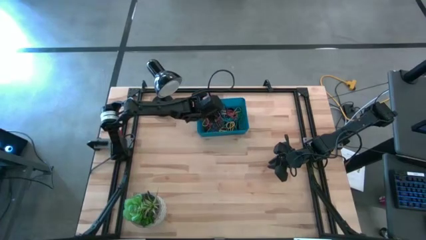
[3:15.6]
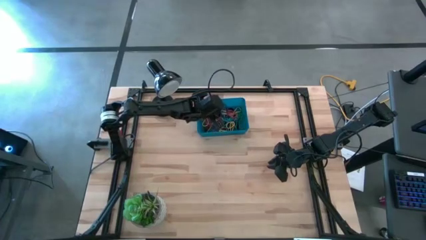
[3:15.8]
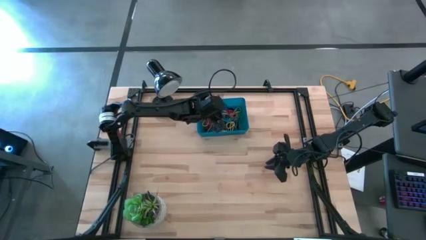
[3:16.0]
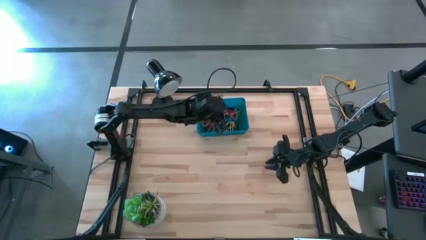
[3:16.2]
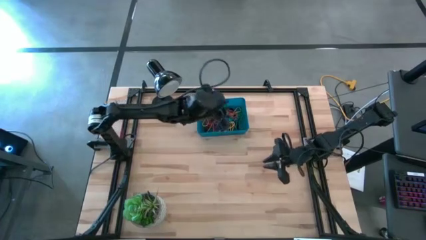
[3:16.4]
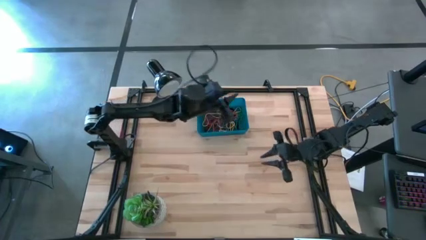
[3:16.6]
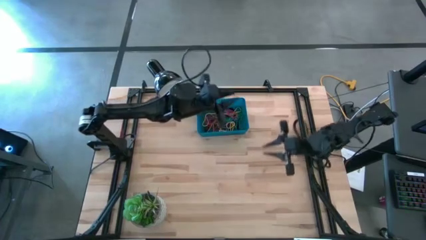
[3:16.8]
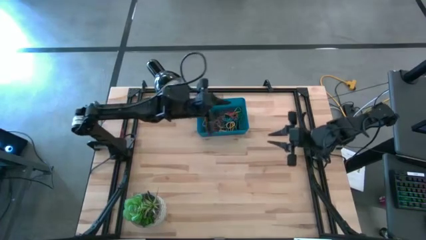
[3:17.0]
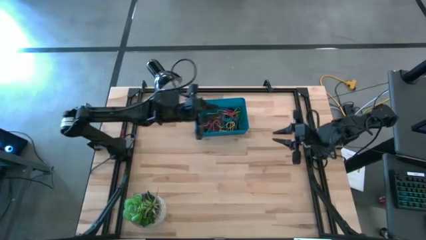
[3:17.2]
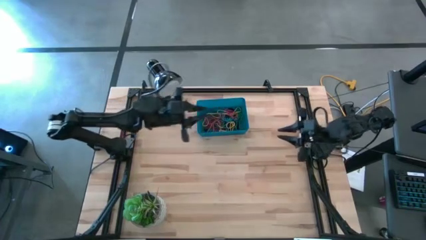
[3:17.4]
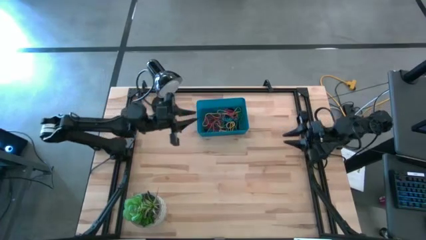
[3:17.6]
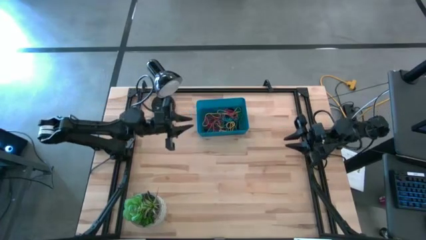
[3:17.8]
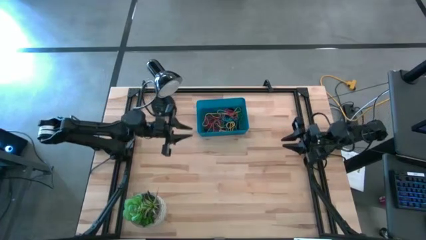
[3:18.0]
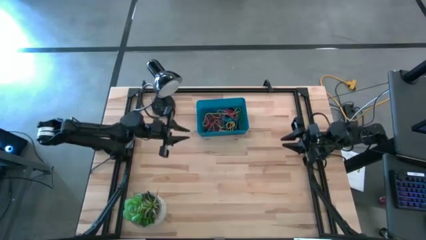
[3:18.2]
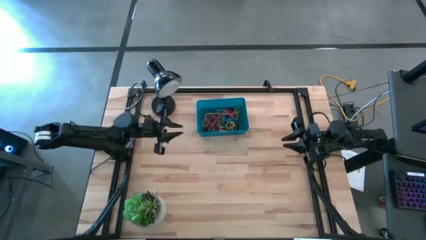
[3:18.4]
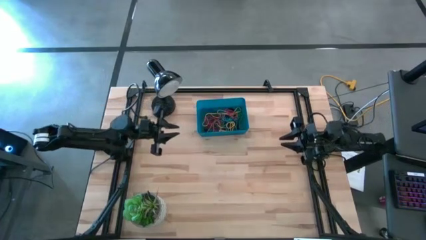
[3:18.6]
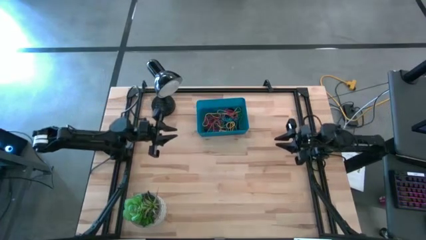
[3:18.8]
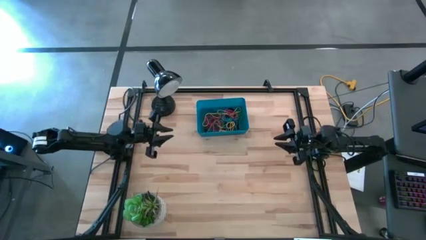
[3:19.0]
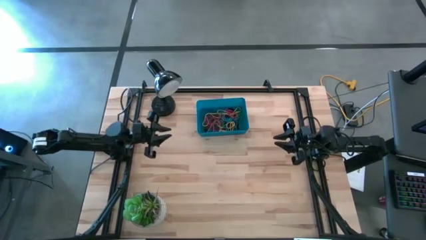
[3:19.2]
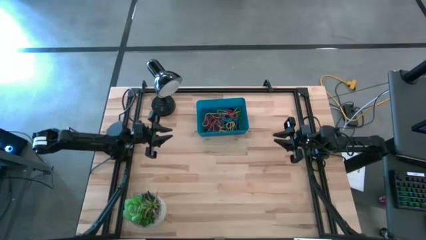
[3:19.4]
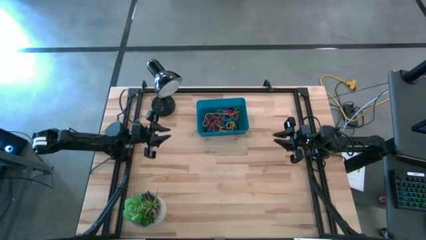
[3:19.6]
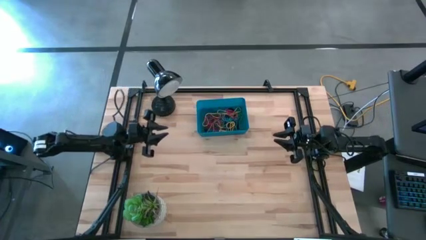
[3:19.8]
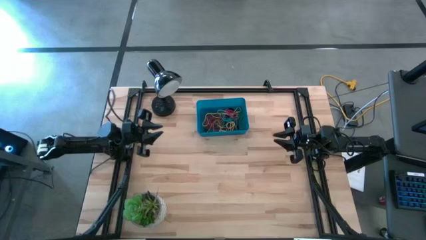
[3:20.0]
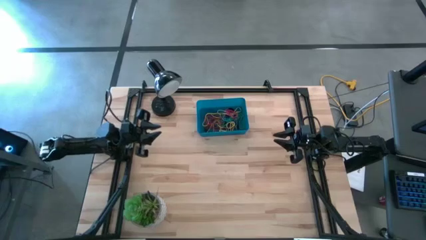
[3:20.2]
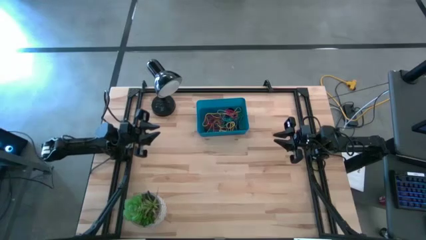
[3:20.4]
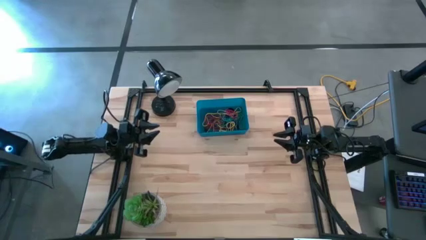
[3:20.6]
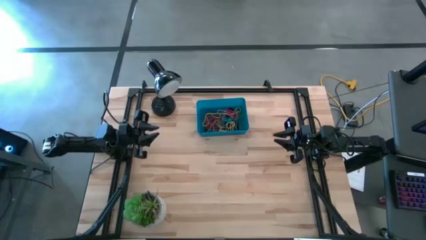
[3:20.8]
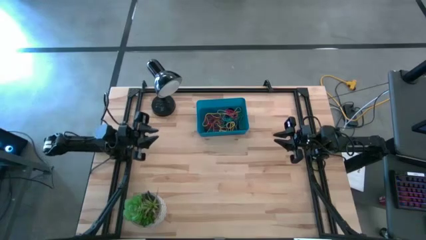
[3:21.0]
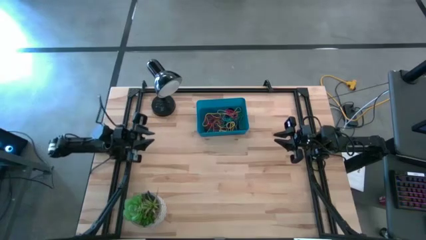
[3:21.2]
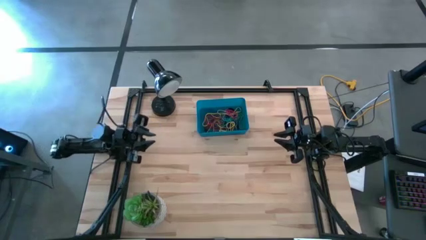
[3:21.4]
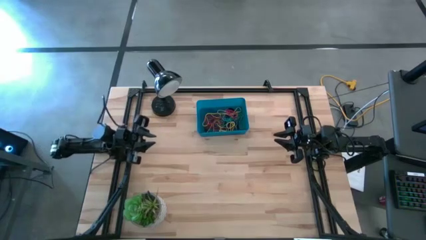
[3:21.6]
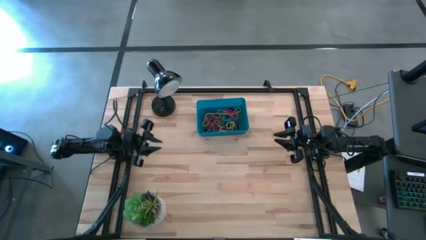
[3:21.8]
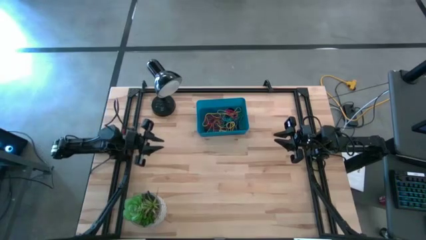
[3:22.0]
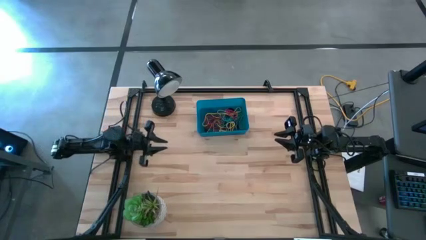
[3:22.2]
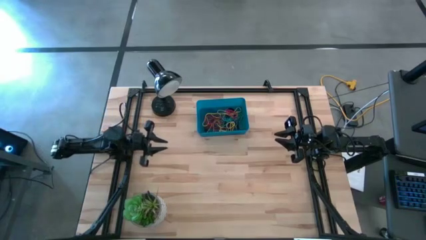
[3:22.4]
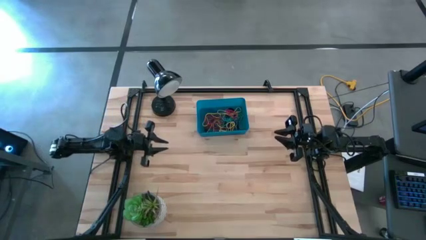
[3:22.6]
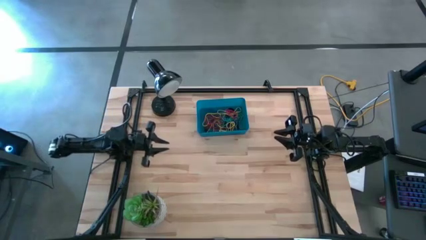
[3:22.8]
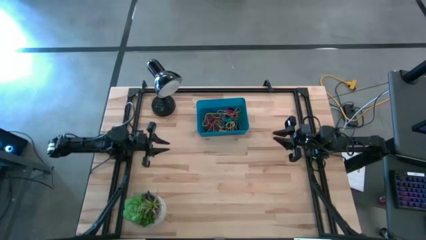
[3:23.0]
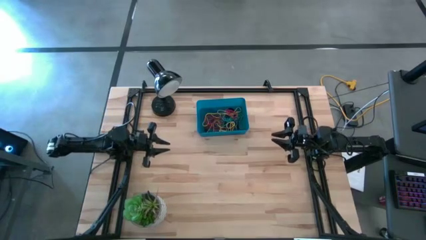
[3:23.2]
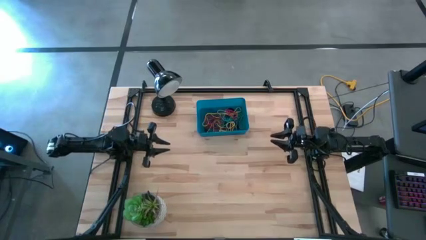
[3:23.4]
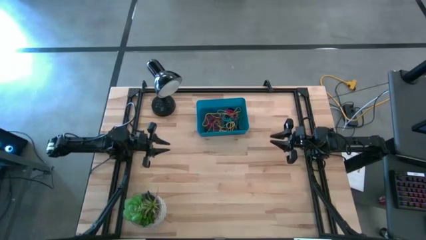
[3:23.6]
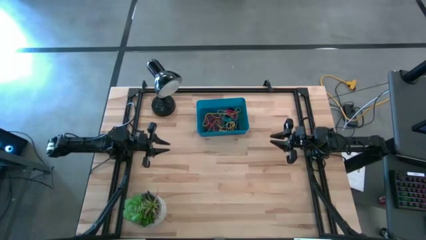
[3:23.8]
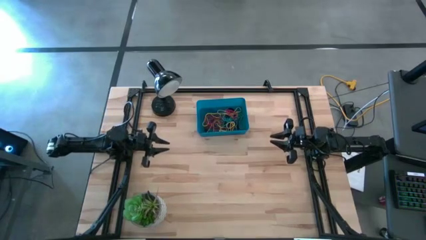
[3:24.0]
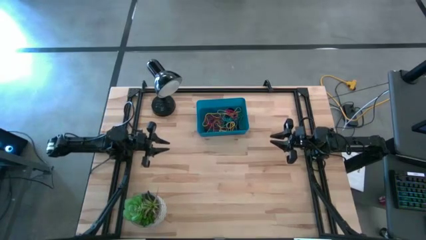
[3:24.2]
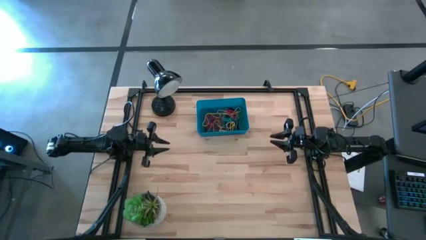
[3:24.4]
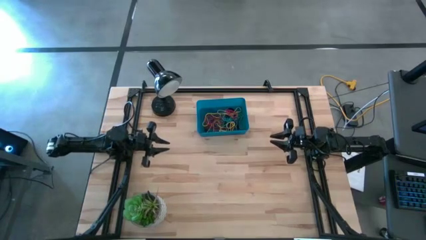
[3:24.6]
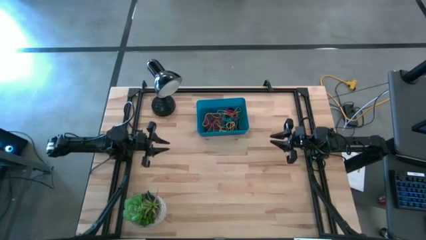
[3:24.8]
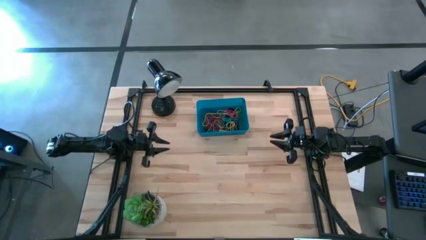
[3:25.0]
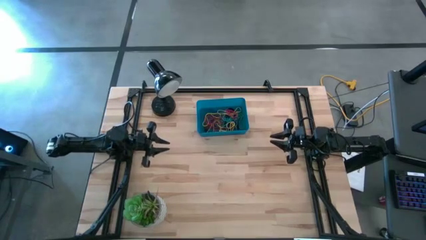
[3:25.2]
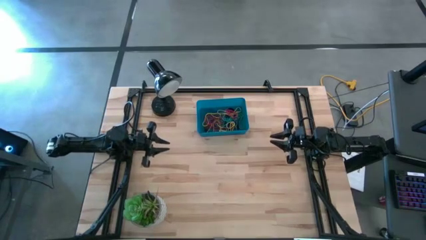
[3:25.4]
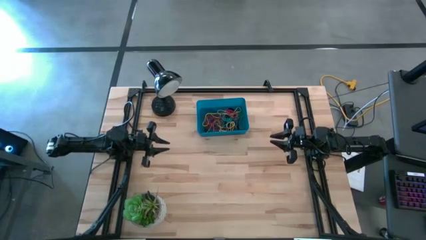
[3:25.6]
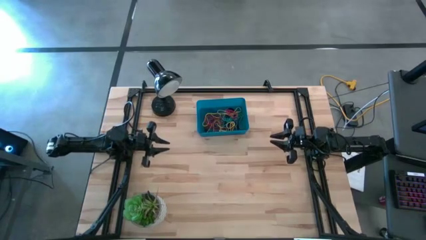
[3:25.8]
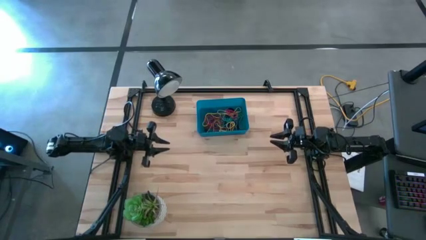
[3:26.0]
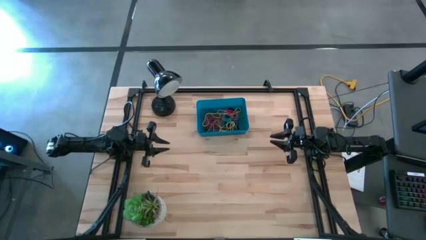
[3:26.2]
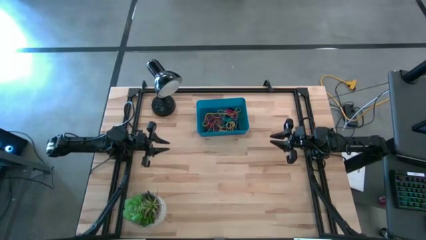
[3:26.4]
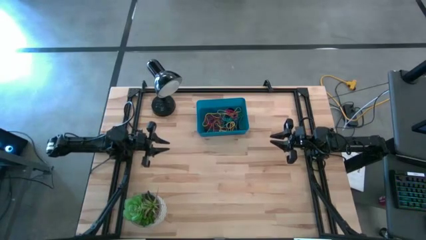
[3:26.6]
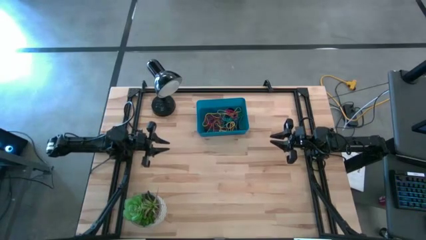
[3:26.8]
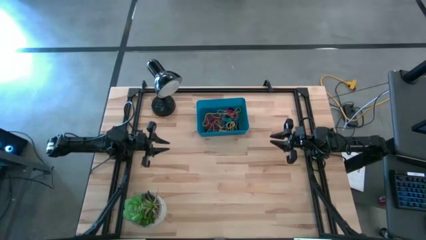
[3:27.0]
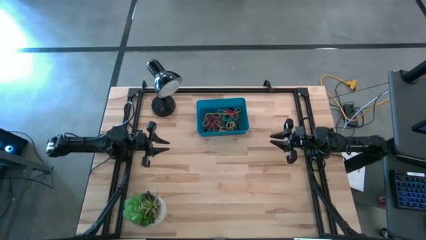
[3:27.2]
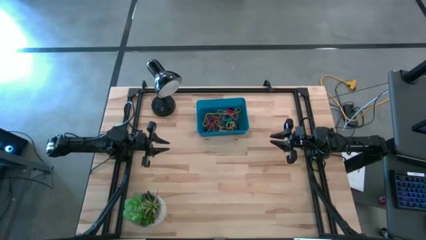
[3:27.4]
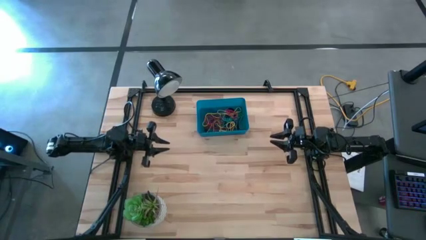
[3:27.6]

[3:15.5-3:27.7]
Task: Pick and place rubber bands into bin
Return to Home Position

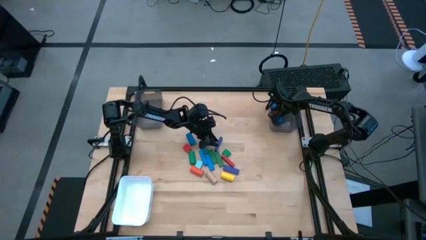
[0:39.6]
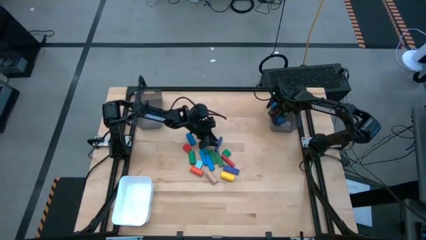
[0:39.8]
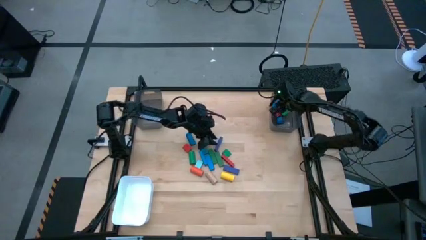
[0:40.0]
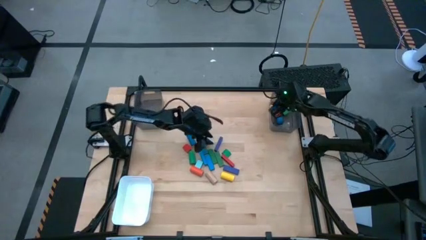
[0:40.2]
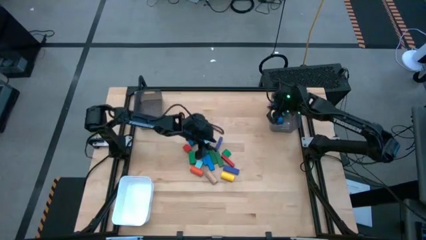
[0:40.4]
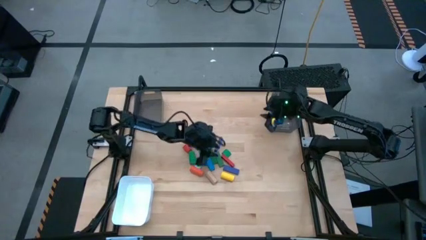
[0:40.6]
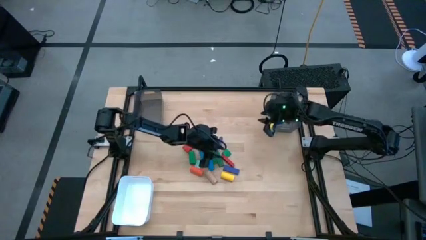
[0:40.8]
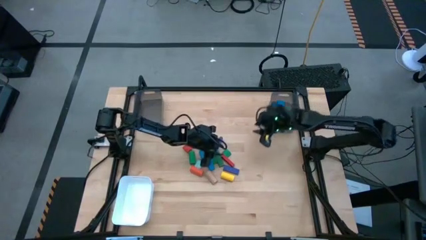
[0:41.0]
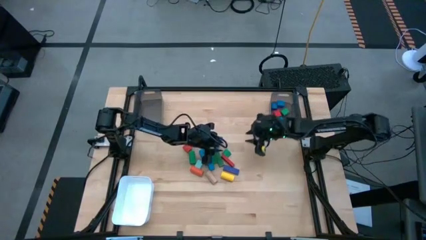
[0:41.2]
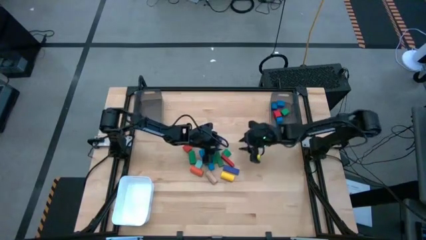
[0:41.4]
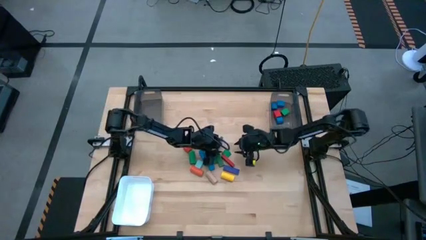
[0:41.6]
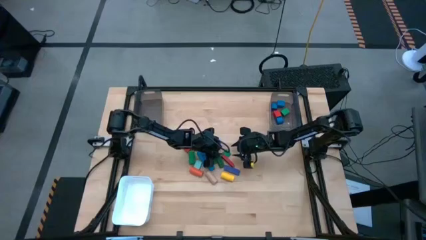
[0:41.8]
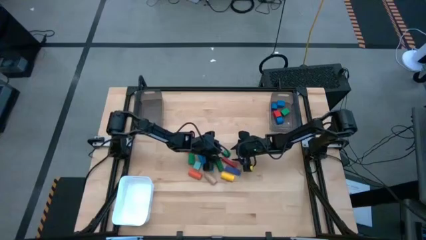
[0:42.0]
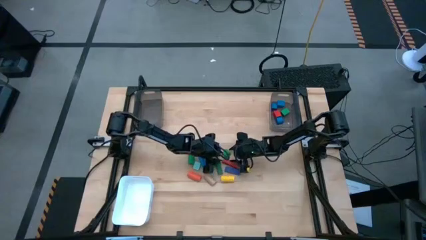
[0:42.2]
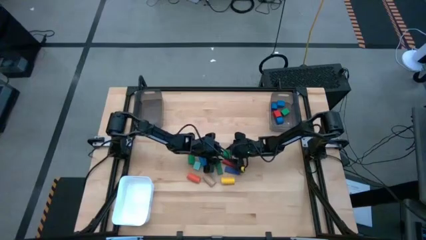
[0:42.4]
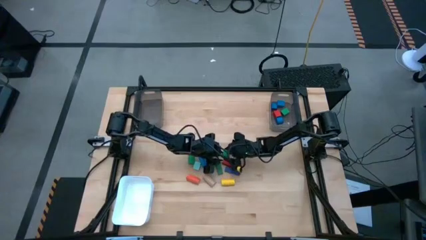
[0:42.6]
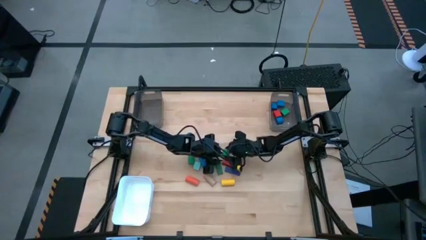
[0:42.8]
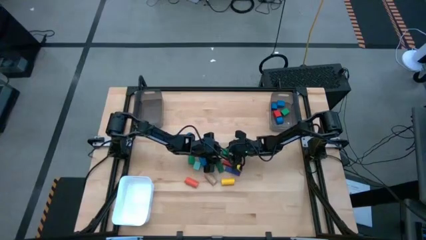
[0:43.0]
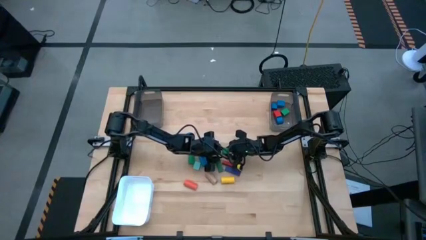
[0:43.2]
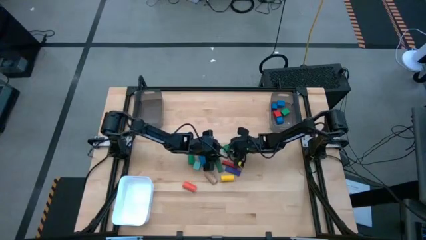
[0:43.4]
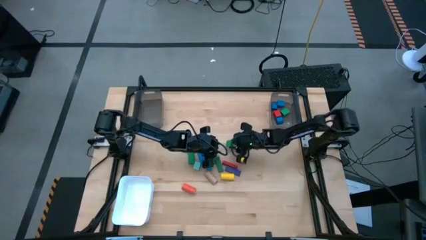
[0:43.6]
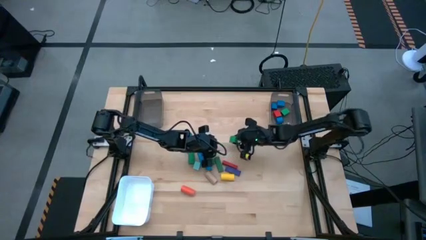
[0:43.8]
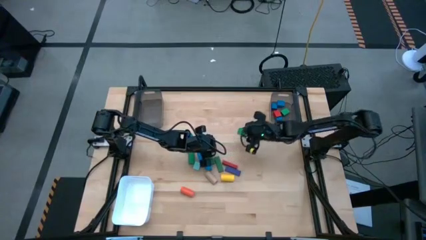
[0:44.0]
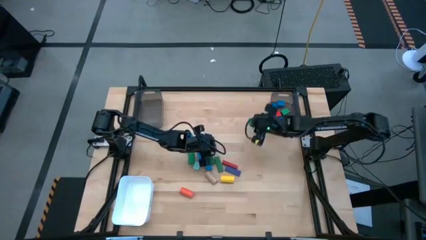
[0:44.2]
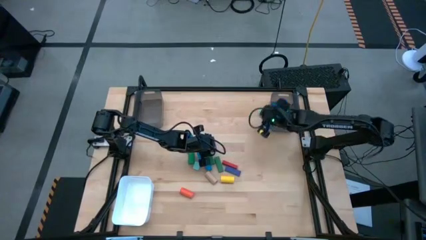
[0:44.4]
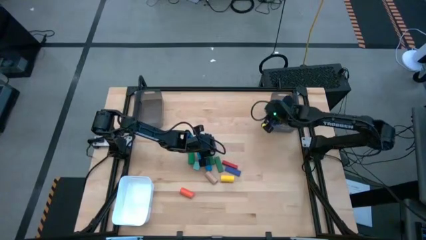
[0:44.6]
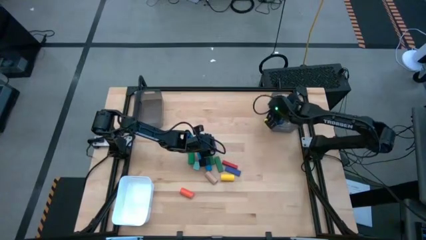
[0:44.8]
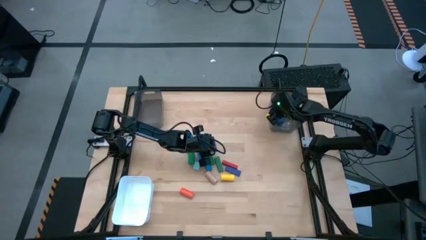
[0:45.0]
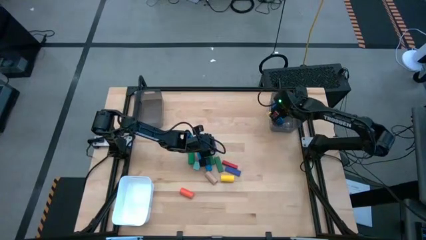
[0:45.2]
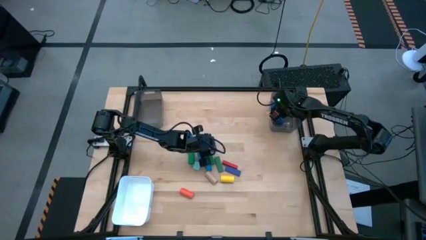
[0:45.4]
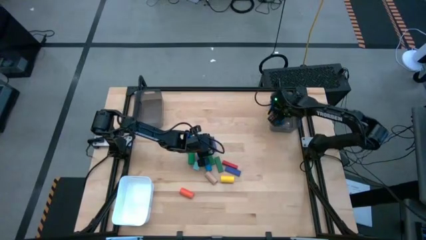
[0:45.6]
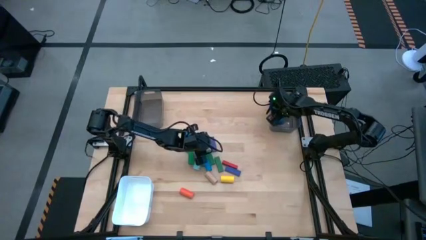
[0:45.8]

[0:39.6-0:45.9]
Task: Sort blocks by size
Put the green half circle block into the right black bin
